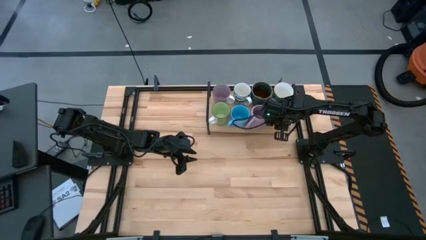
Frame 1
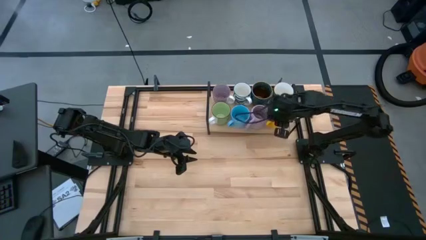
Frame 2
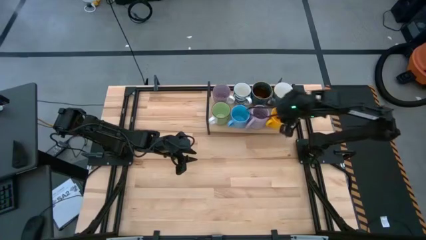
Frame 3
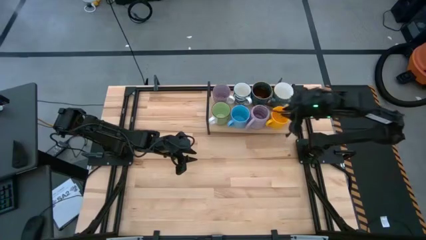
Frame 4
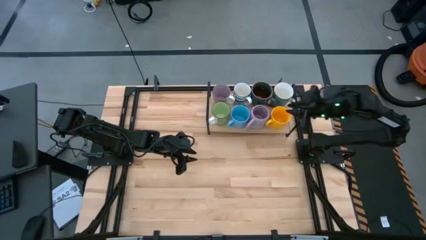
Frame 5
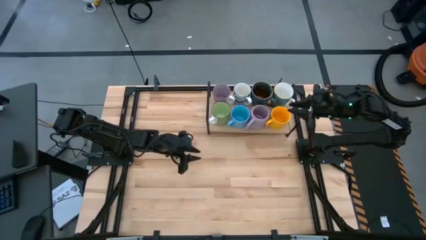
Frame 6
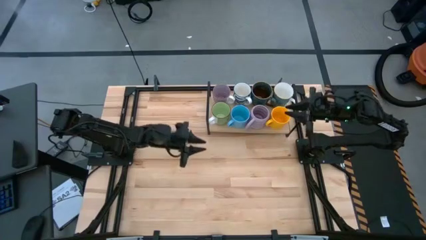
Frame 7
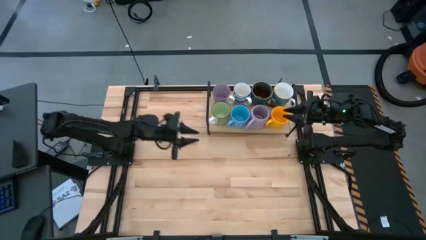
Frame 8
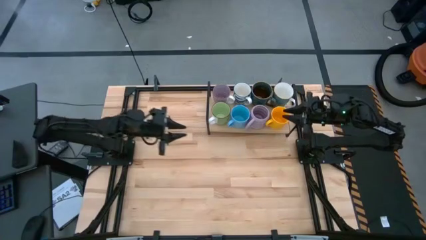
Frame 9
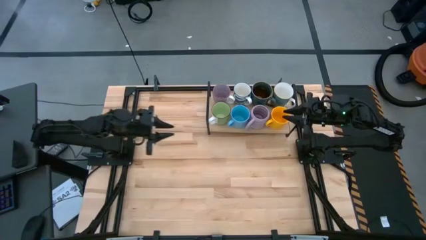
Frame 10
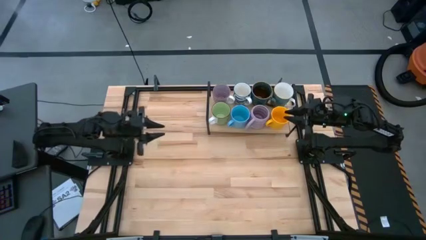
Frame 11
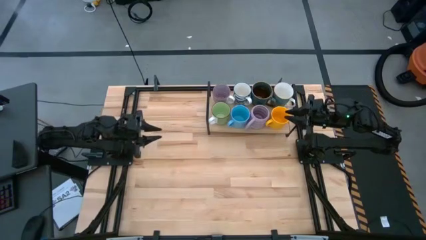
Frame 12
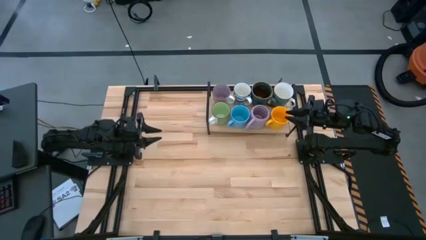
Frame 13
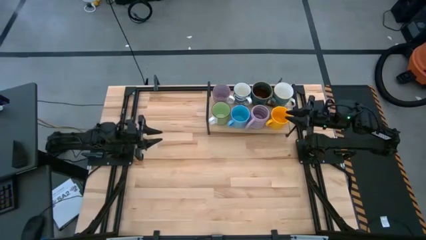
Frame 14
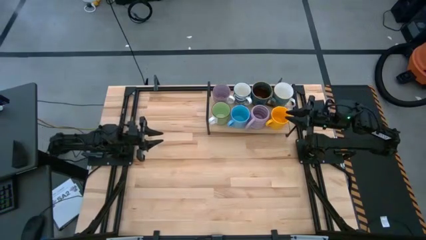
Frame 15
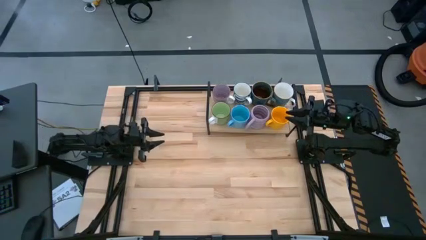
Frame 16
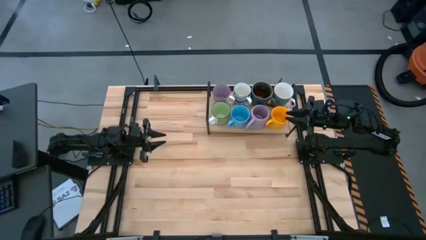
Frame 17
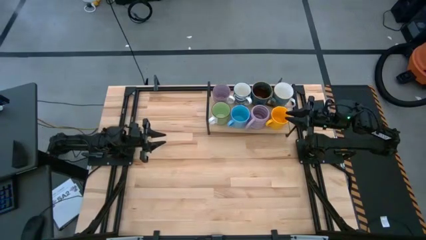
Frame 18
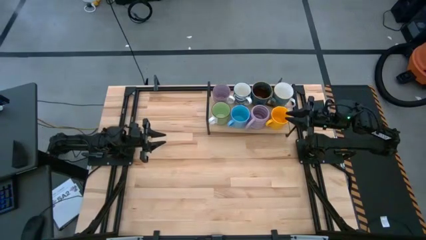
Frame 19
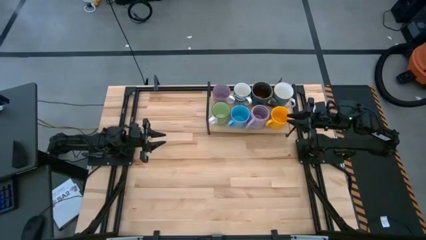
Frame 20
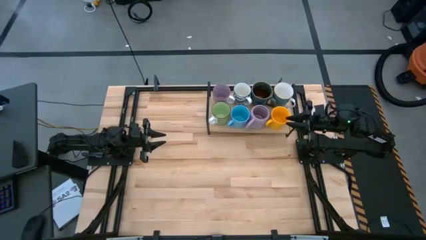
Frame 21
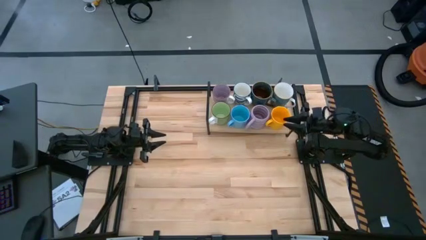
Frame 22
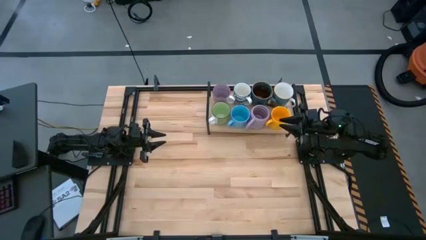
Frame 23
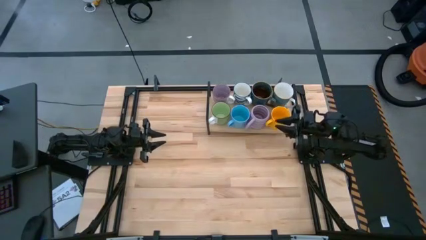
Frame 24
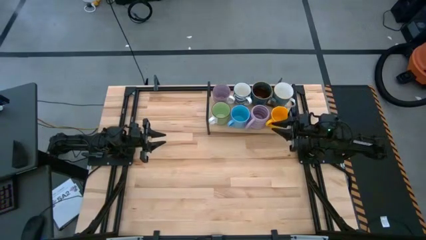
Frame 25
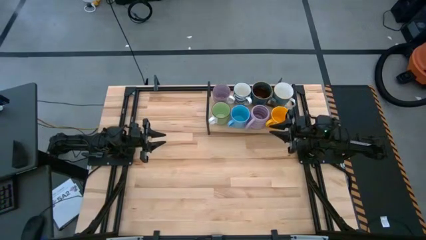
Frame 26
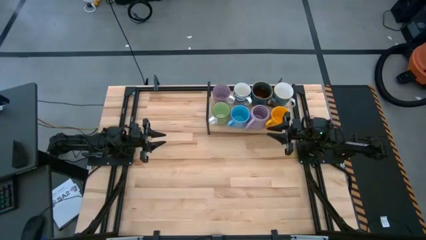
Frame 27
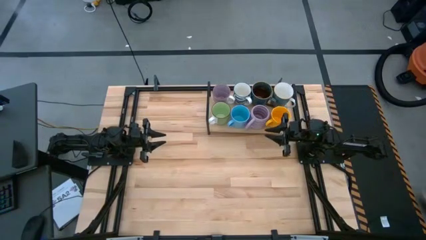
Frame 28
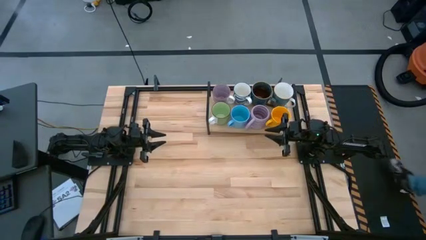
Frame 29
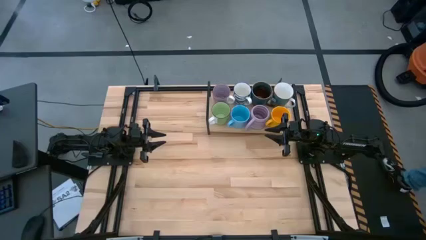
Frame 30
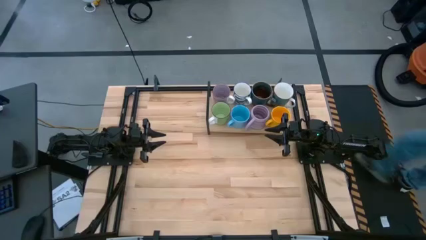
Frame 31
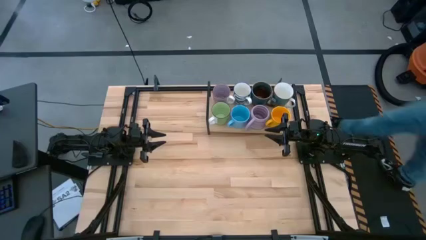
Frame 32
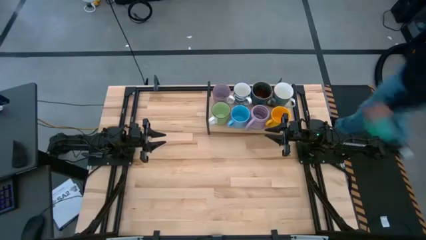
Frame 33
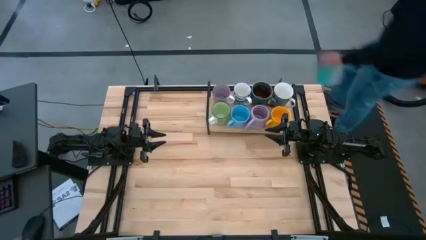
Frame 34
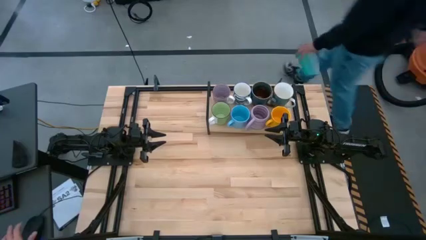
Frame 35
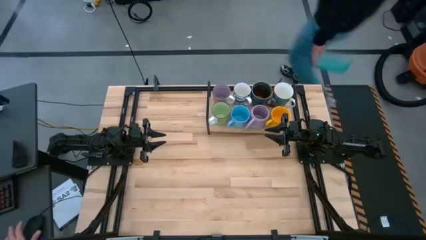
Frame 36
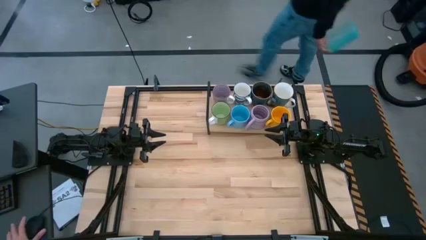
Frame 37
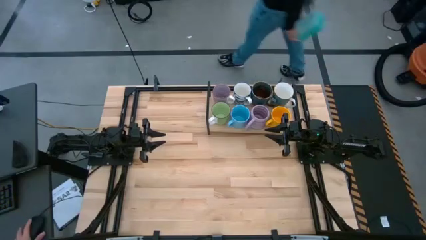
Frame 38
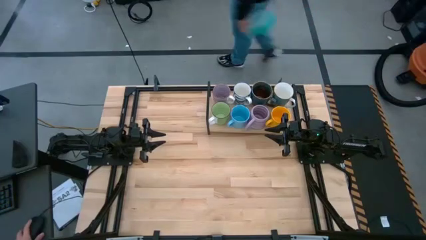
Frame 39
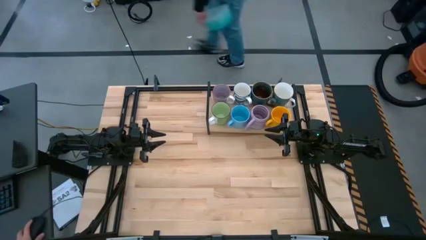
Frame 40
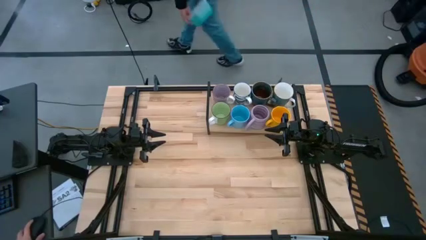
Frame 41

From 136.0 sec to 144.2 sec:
Task: Place coffee mugs
Return to Home Position

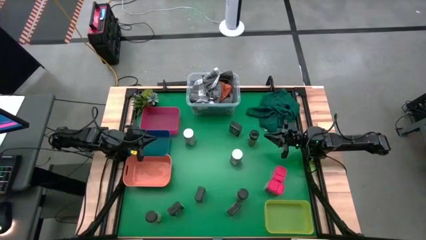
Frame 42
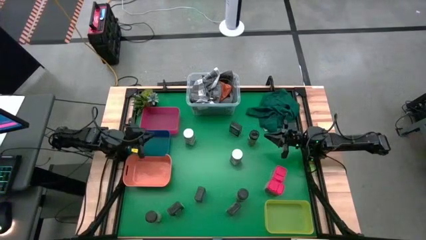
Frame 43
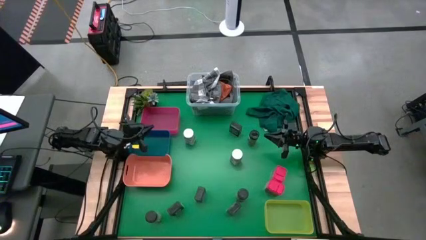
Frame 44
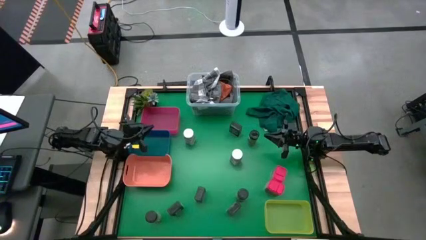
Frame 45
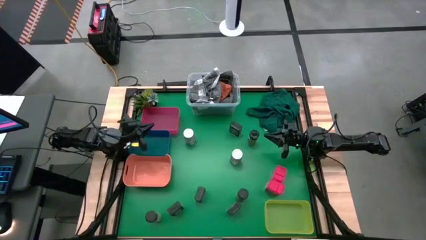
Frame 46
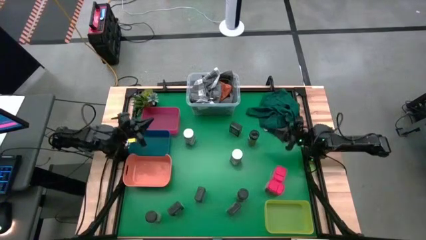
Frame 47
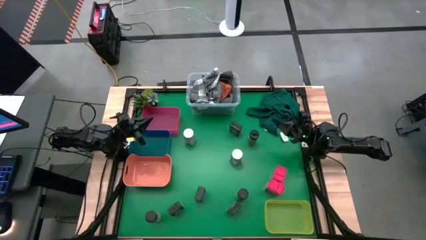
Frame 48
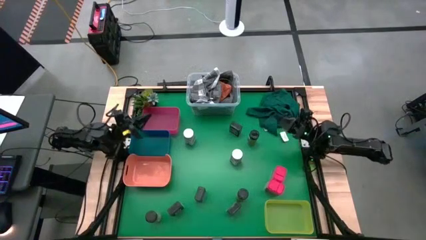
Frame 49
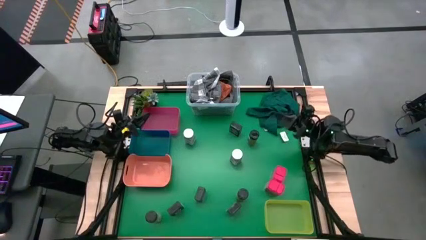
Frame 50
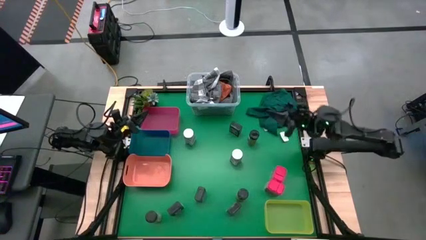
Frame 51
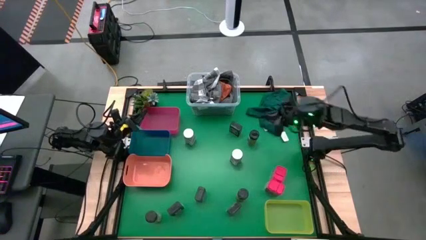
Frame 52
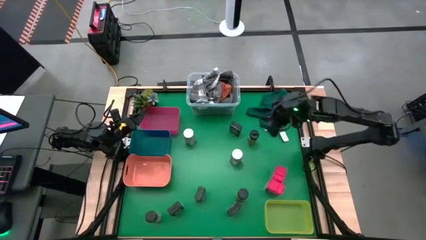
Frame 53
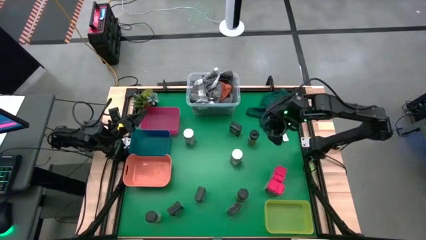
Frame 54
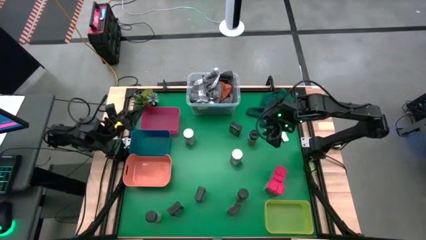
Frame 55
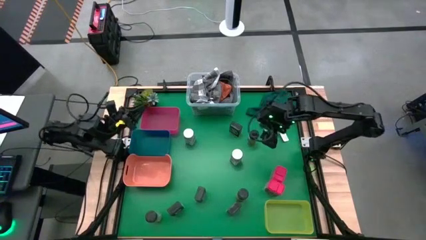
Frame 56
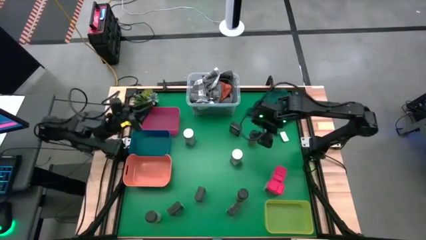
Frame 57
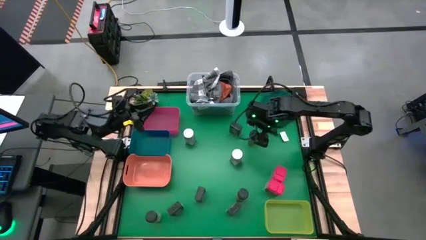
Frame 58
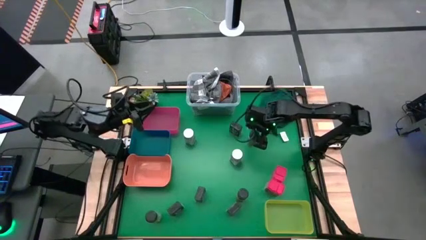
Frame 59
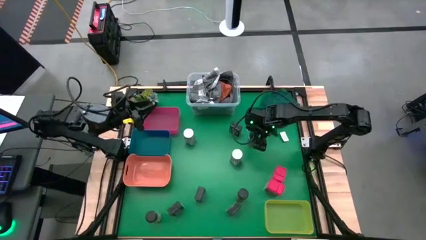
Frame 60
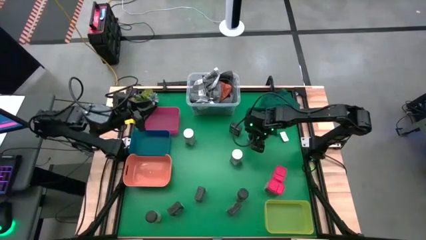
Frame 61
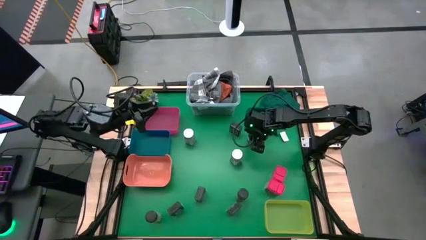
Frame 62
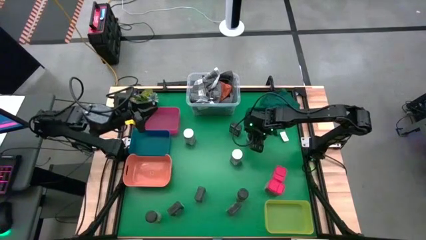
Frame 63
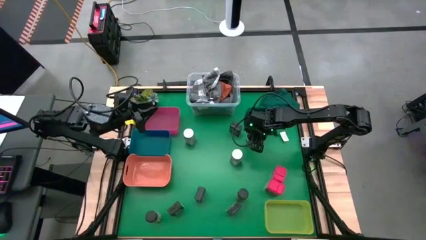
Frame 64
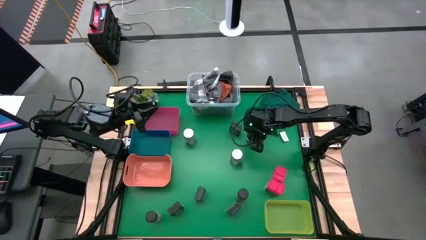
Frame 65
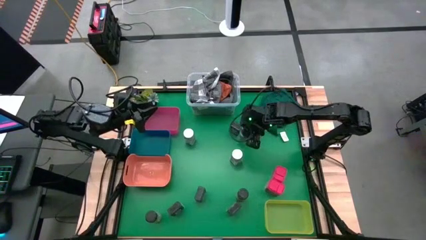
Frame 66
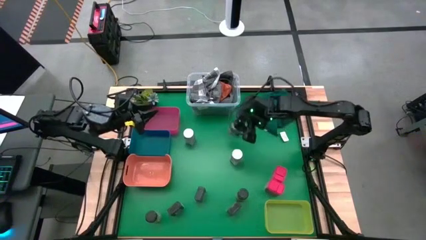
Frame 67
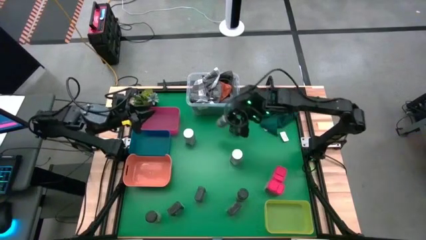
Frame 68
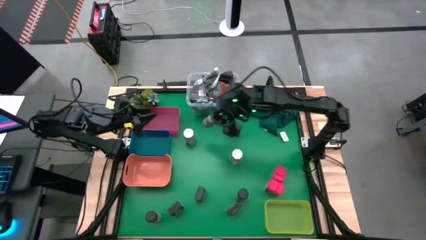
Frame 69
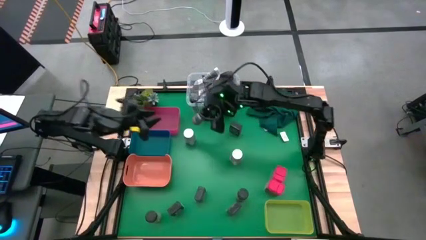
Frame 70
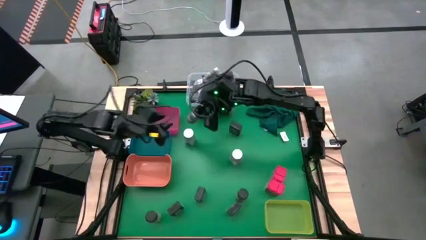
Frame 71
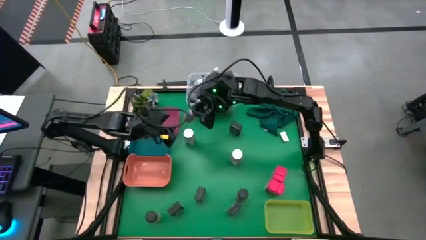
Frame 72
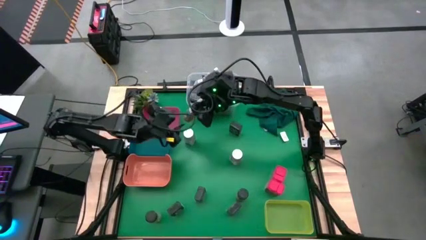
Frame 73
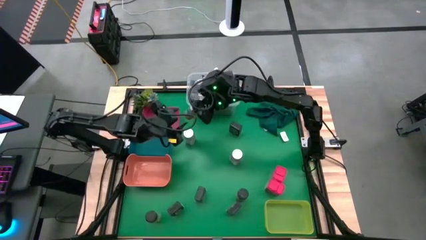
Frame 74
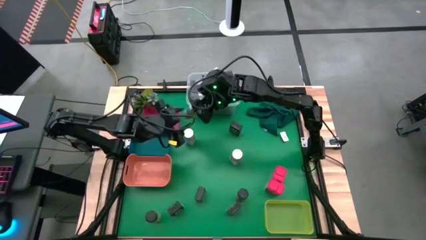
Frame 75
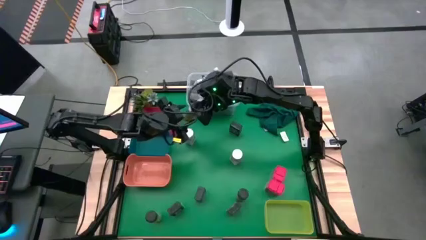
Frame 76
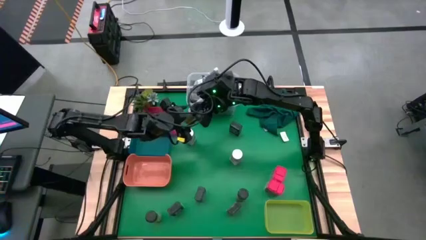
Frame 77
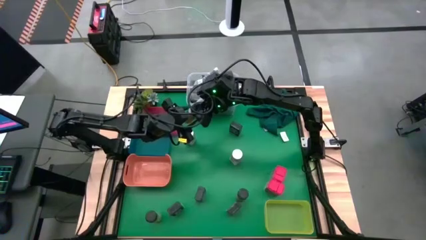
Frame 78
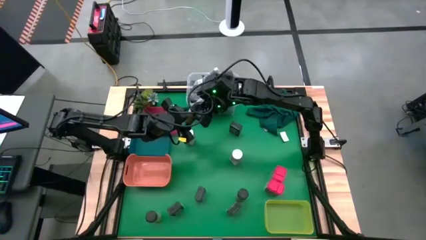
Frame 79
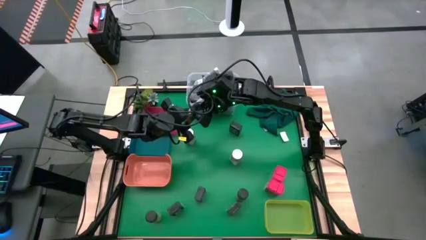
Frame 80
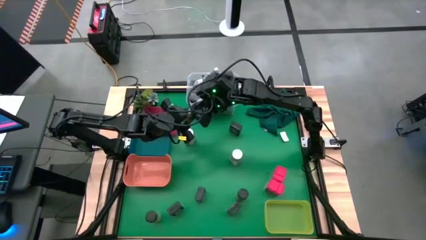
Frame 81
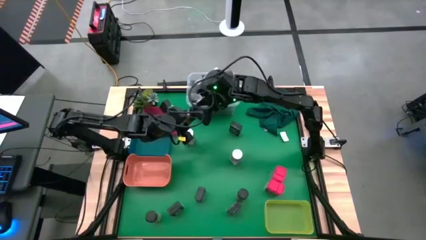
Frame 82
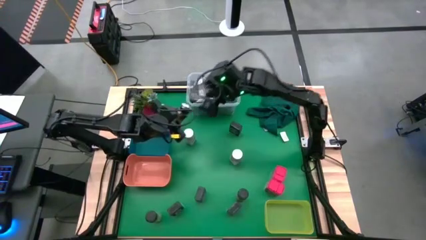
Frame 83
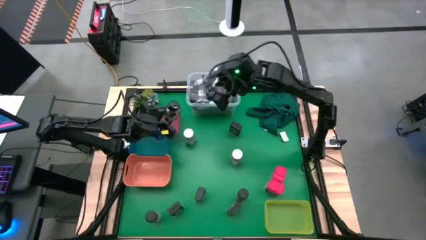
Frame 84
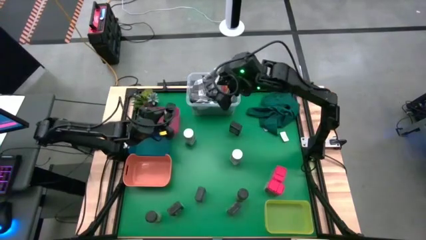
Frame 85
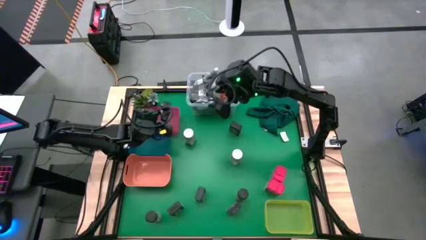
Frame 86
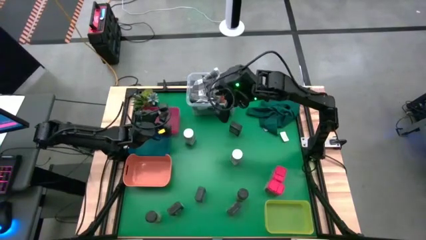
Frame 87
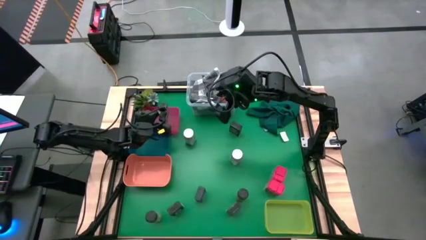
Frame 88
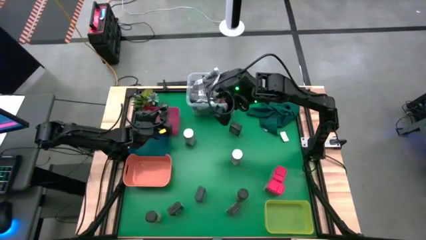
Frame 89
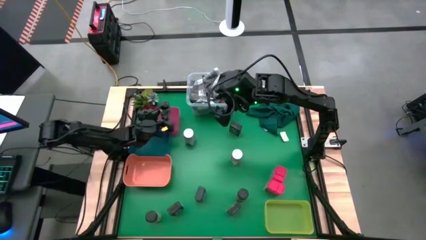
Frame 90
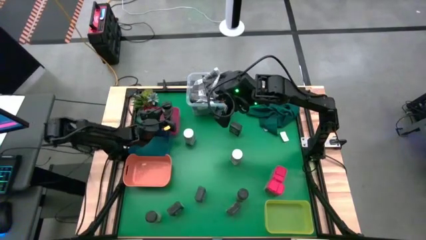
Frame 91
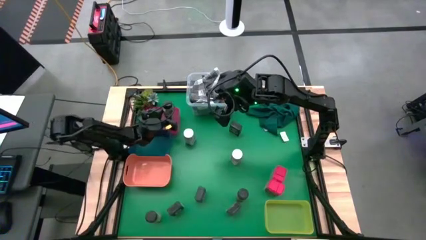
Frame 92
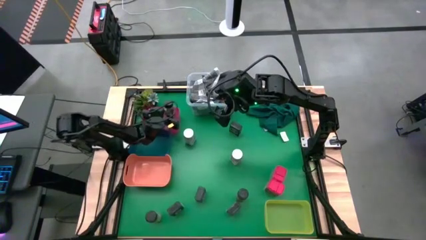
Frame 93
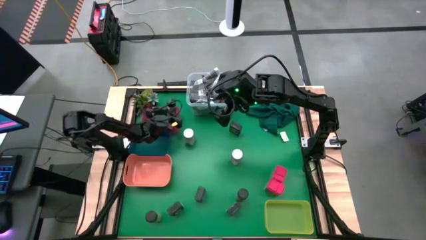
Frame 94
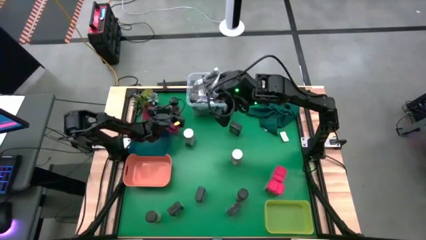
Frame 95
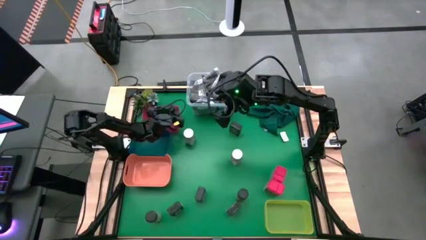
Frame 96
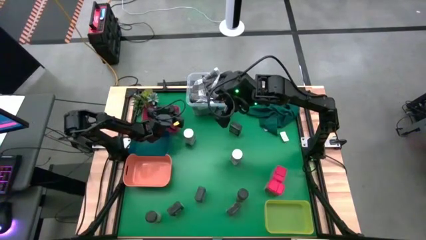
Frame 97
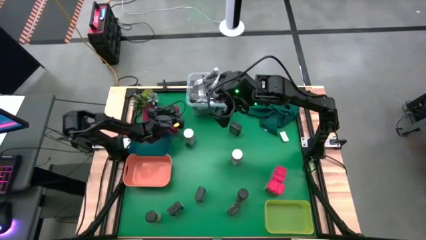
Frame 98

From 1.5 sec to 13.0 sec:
Task: Sort spices by type
Put the top black spice bottle into the red bin
